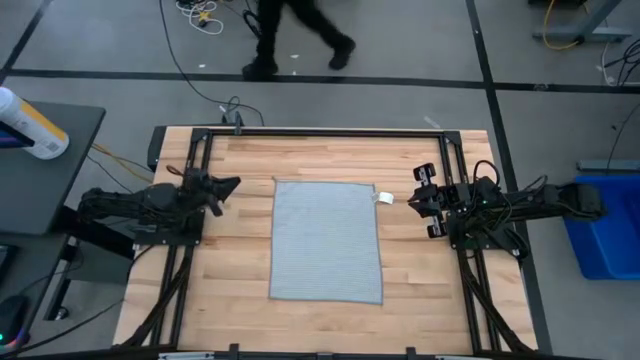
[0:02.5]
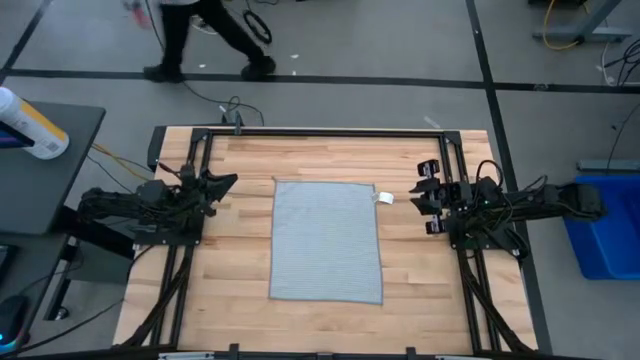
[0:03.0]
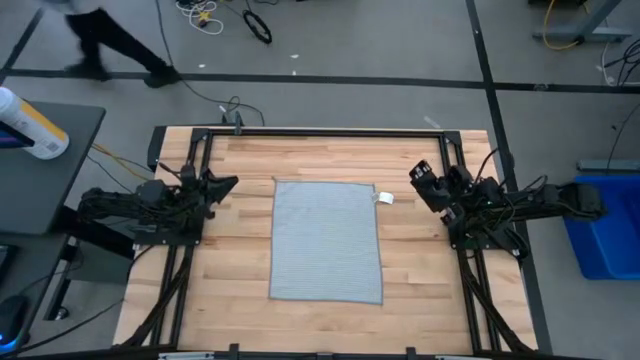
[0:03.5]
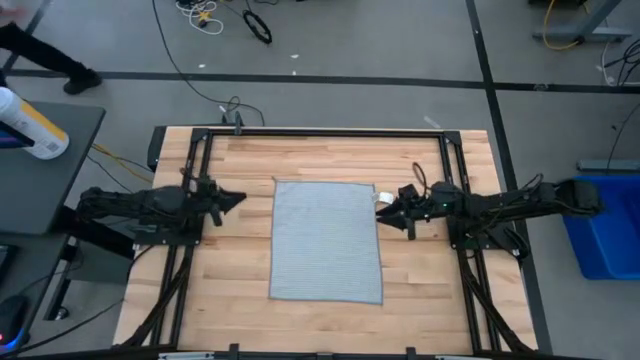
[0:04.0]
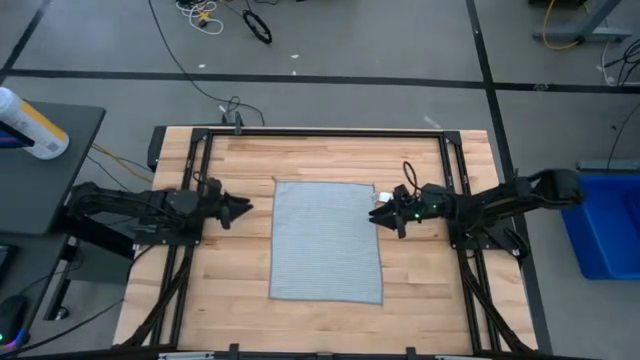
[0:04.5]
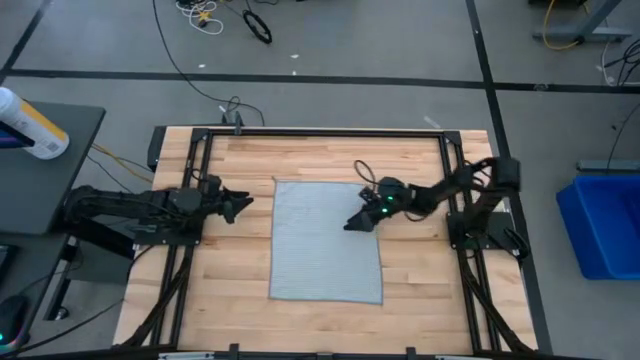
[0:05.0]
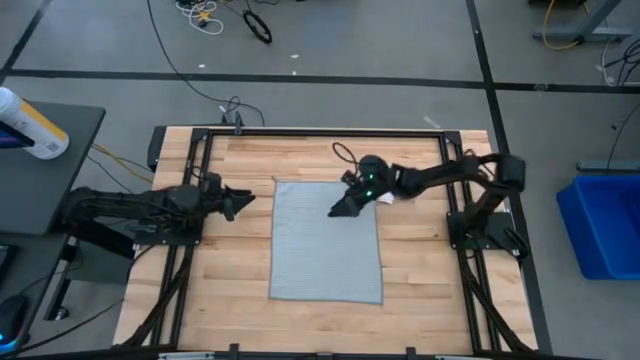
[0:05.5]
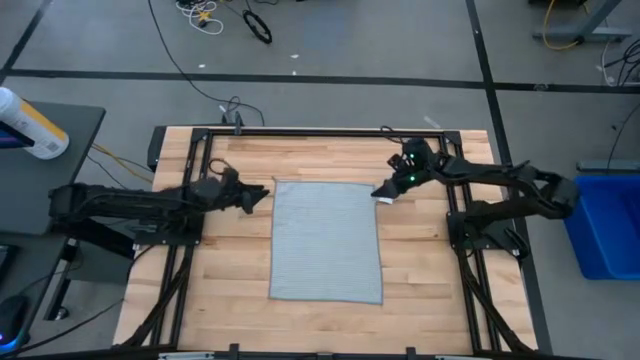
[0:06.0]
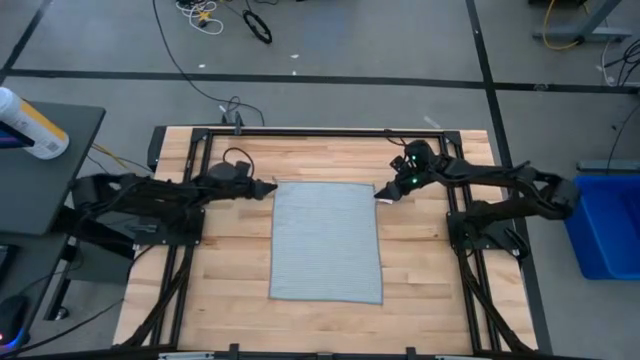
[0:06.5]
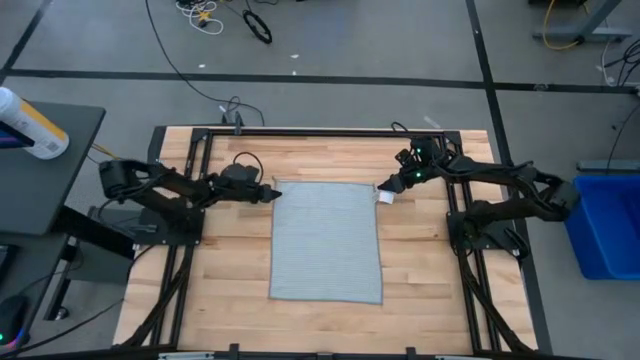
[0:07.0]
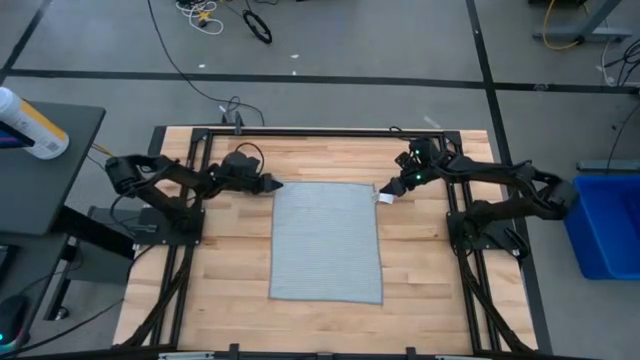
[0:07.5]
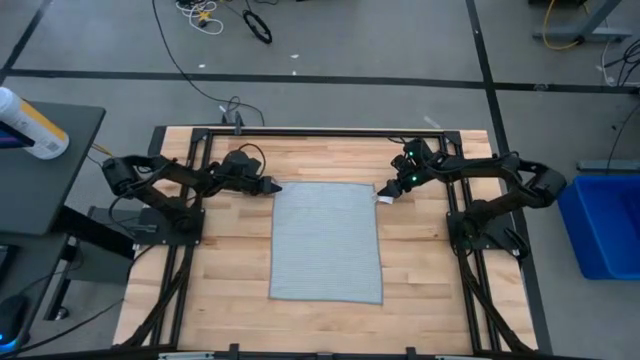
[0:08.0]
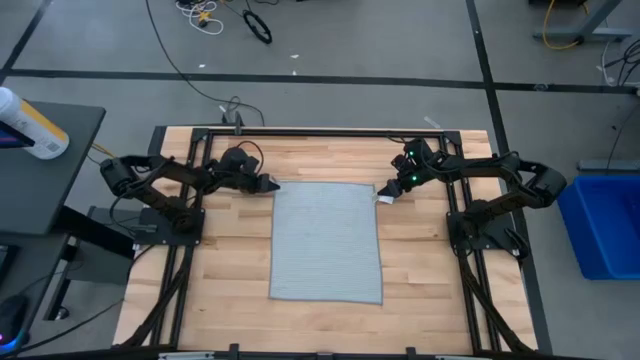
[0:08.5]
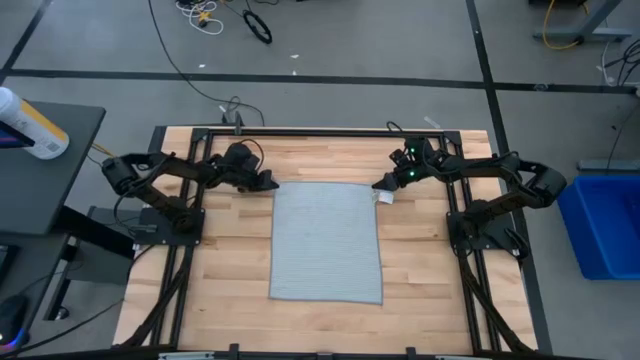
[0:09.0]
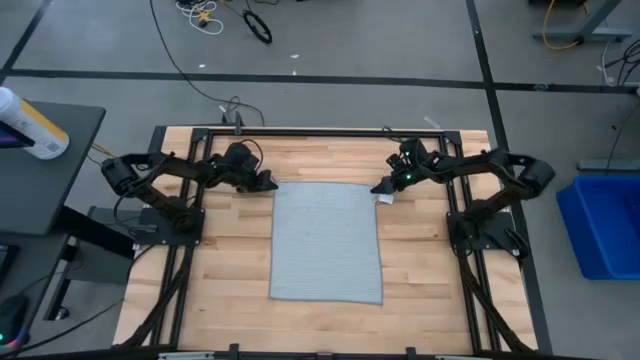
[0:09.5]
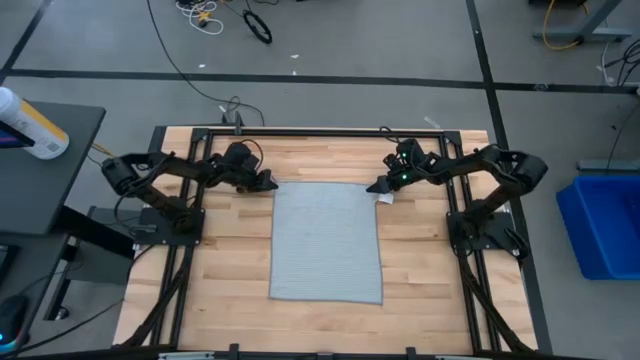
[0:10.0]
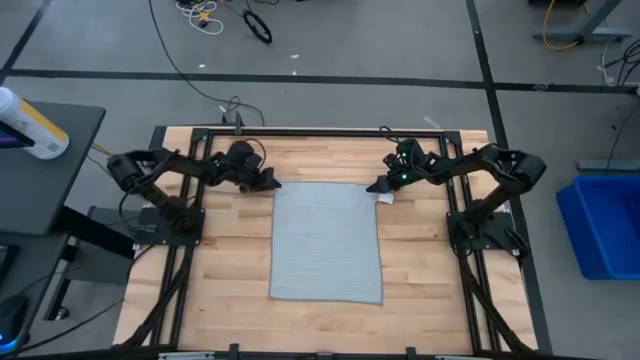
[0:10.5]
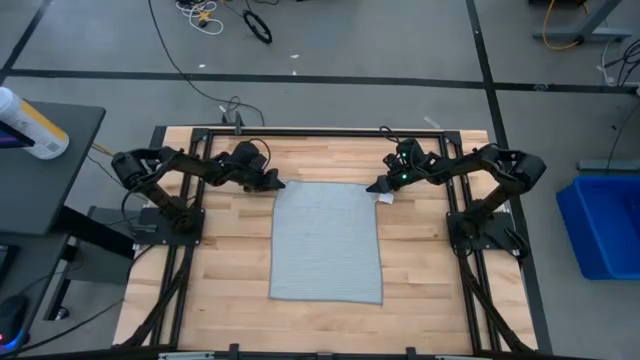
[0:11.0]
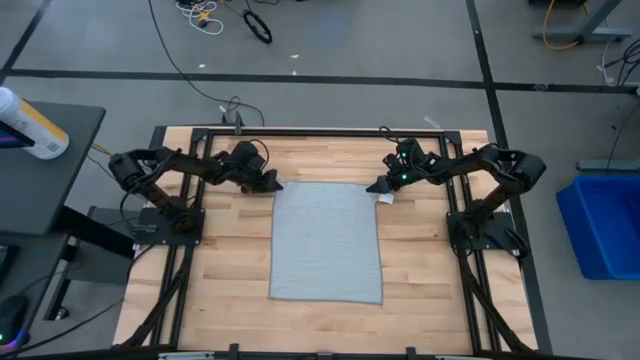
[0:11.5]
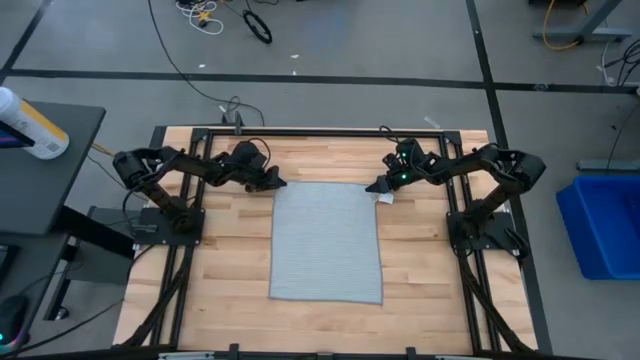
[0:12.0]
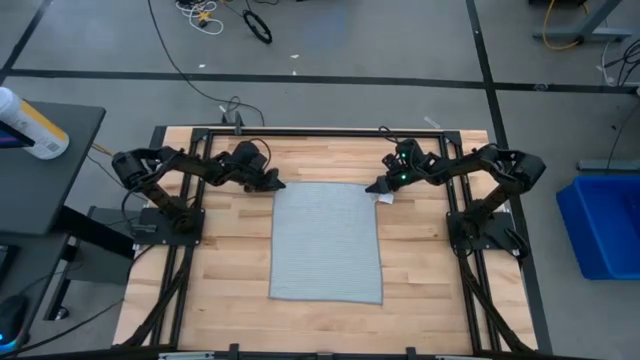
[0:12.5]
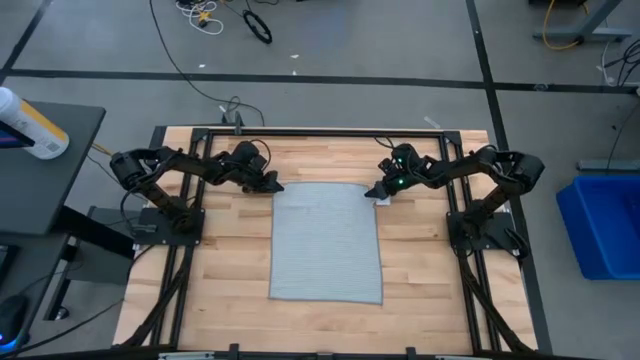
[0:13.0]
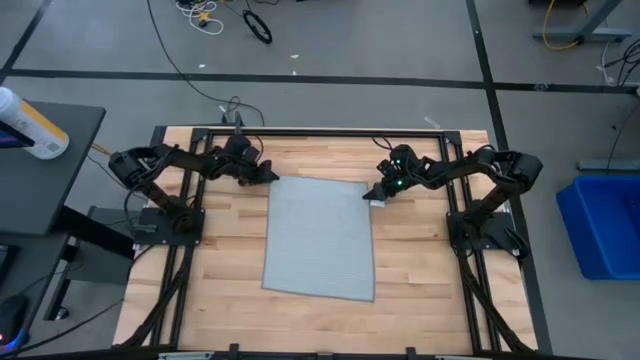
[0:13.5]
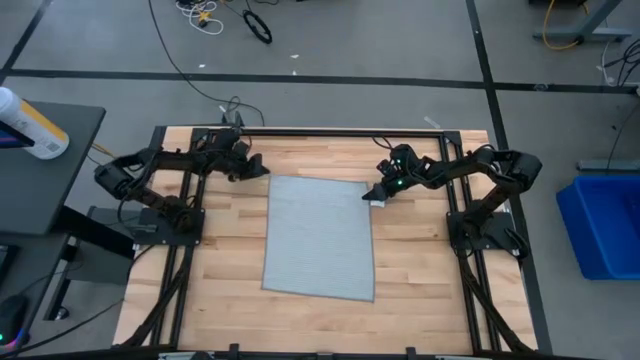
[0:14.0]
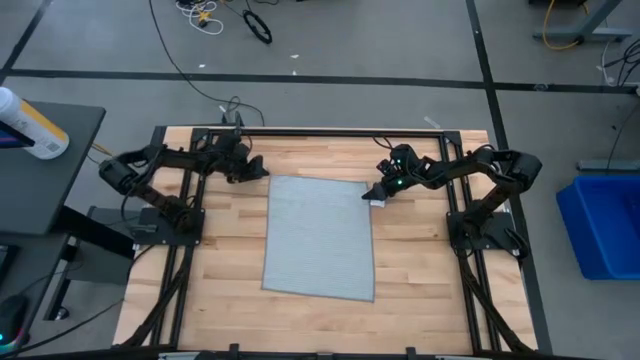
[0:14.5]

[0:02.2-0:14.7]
Task: Fold microfiber towels
Fold the grey towel

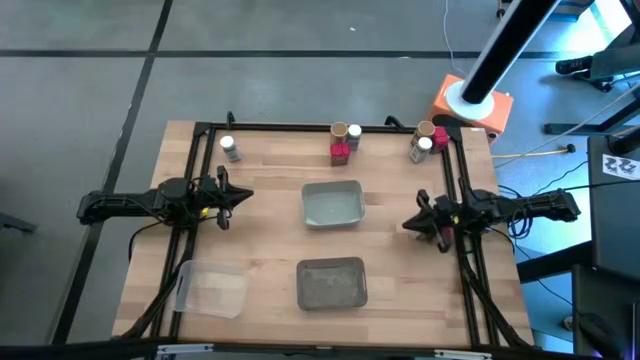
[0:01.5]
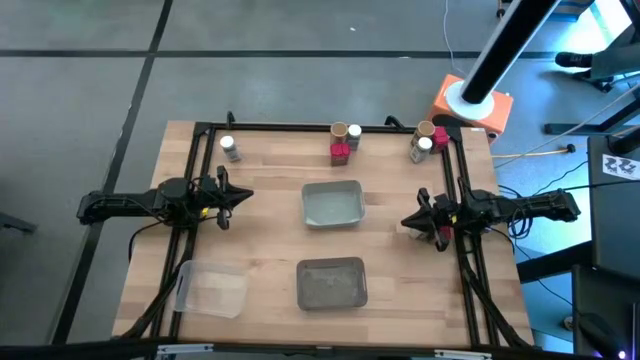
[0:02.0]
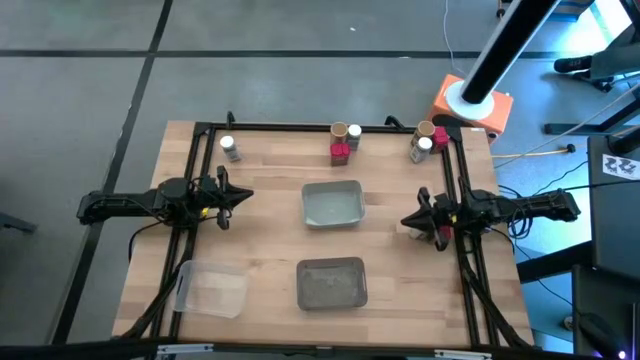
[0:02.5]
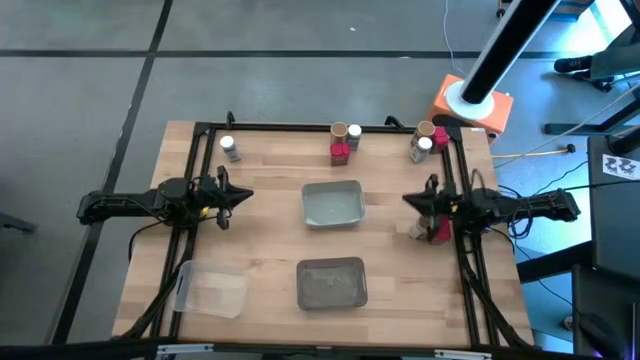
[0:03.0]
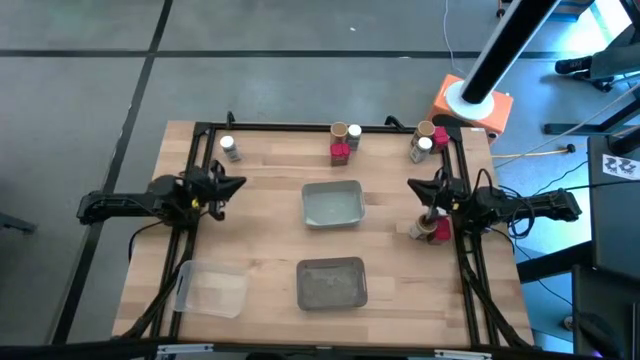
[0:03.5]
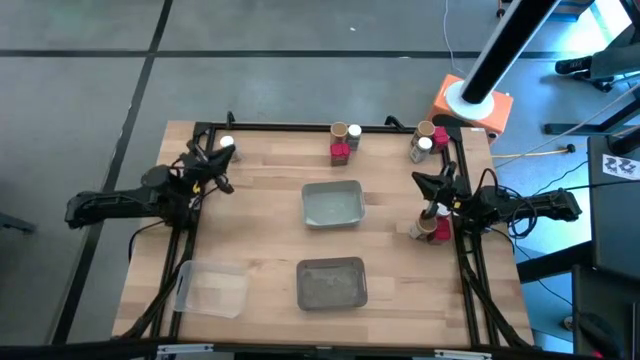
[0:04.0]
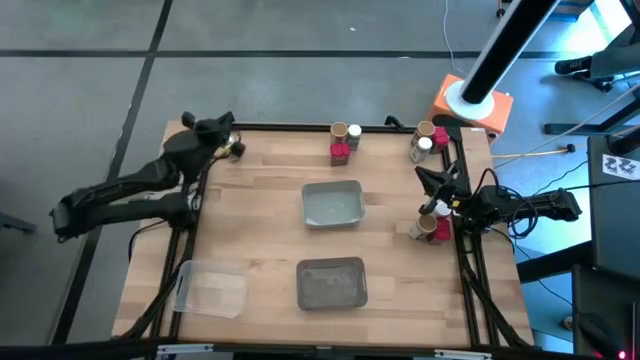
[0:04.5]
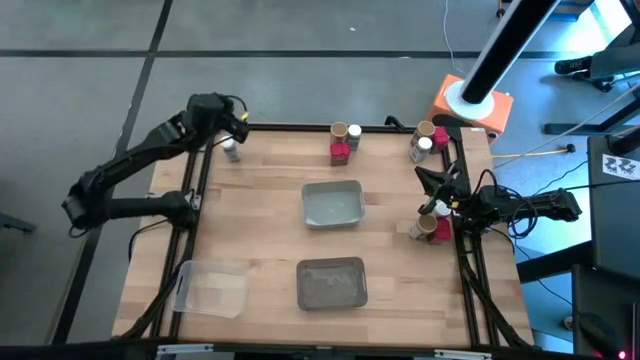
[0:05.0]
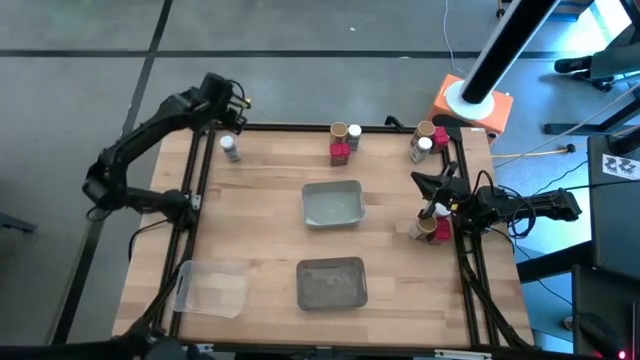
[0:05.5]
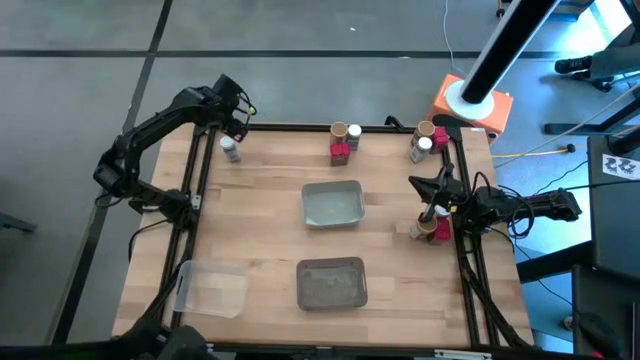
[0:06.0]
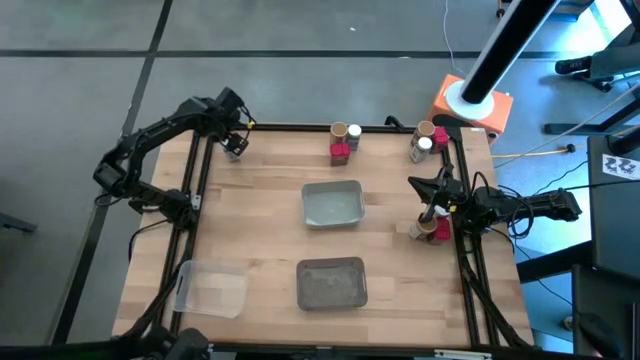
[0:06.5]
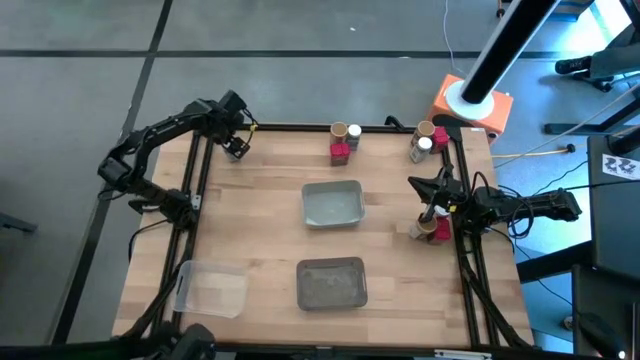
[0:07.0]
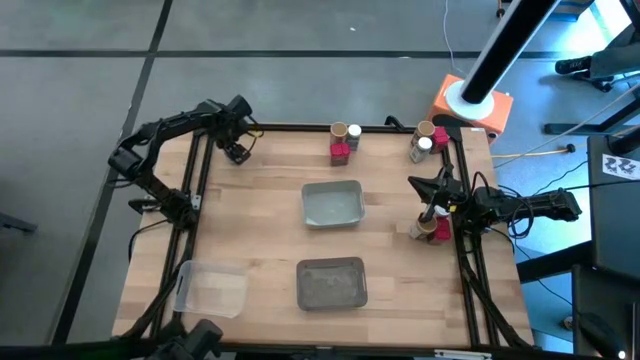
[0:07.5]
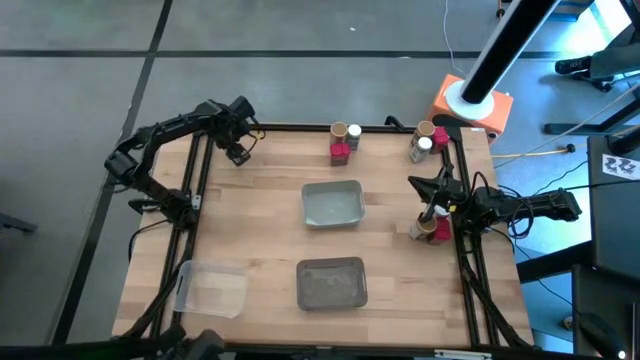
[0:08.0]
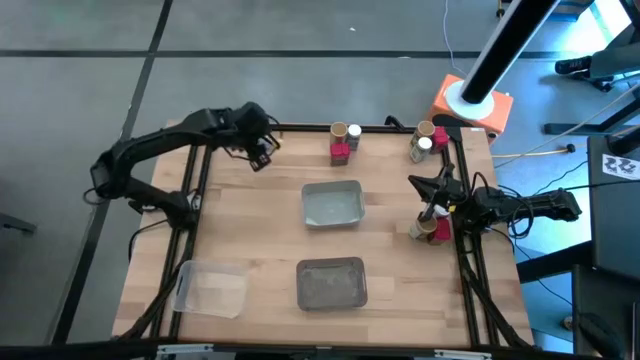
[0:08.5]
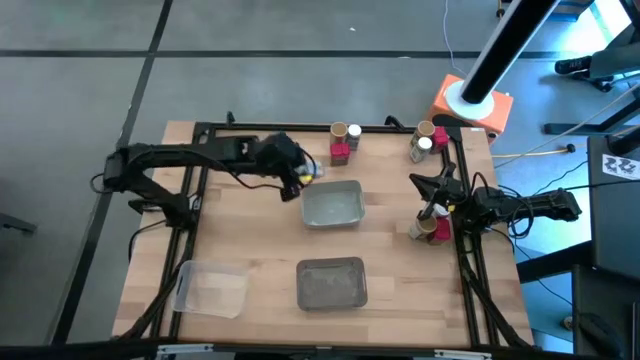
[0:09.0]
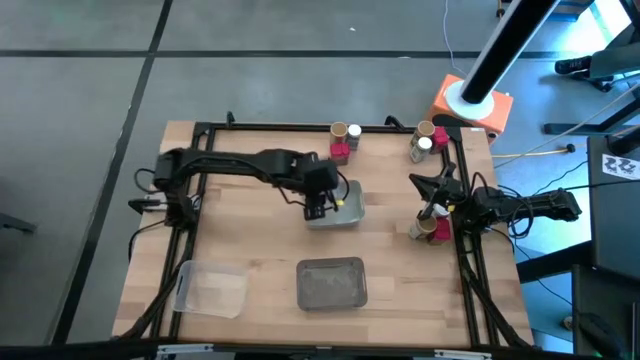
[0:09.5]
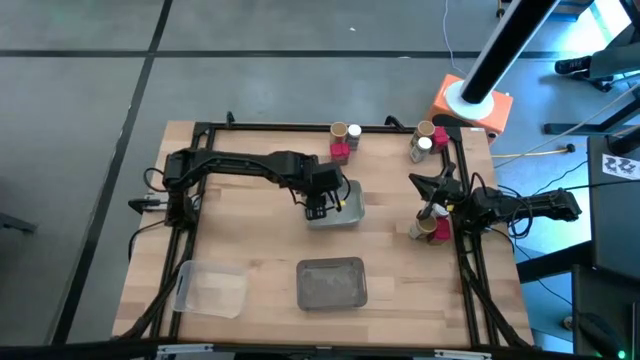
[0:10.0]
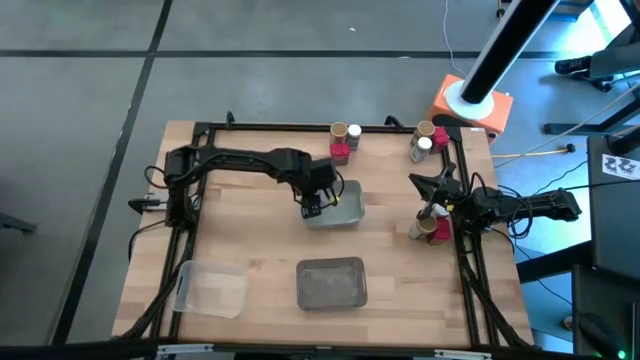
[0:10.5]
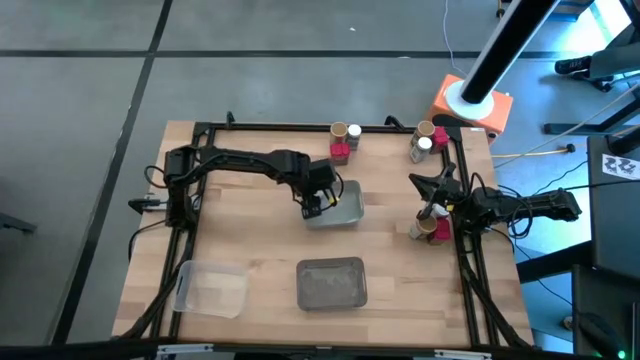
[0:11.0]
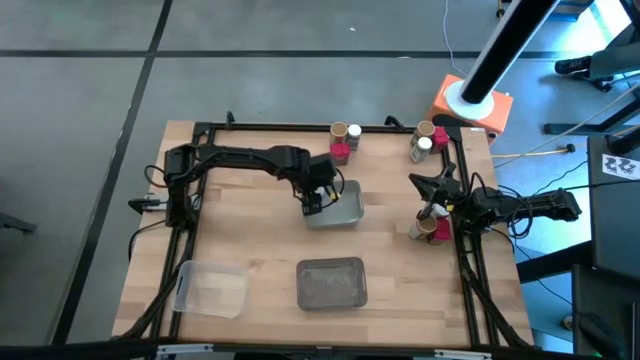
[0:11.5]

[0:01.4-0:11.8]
Task: Sort spices by type
Put the top left white seasoning bottle into the gray bin
